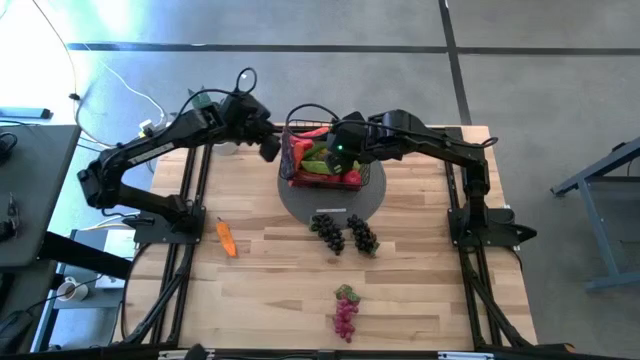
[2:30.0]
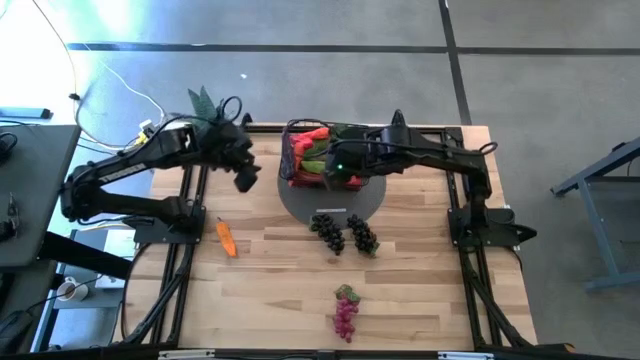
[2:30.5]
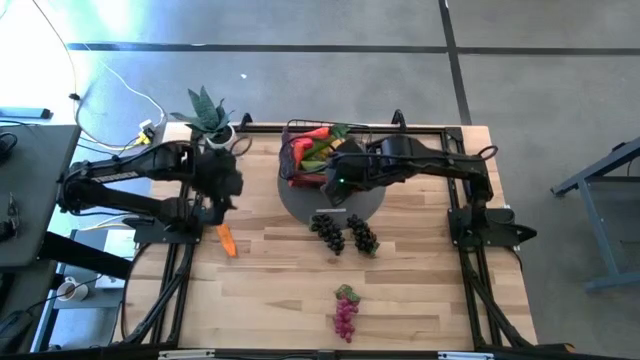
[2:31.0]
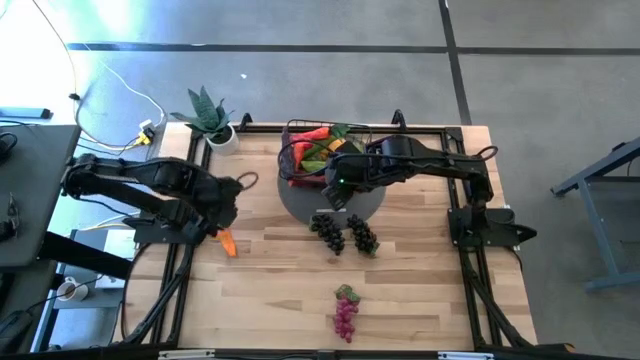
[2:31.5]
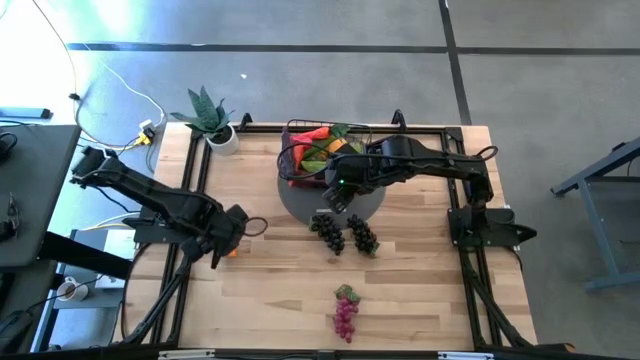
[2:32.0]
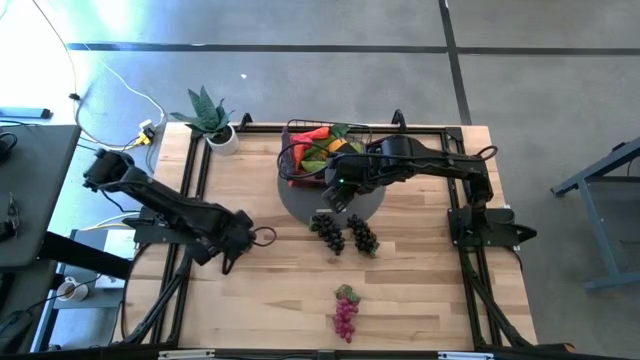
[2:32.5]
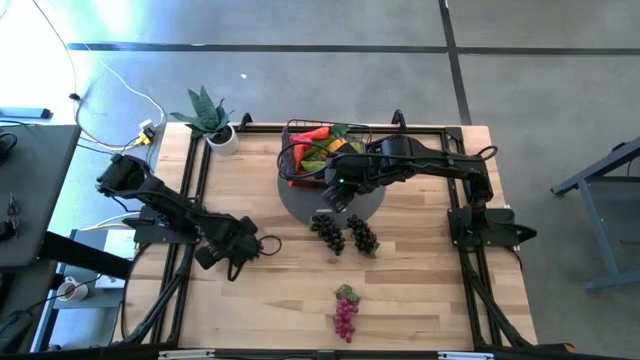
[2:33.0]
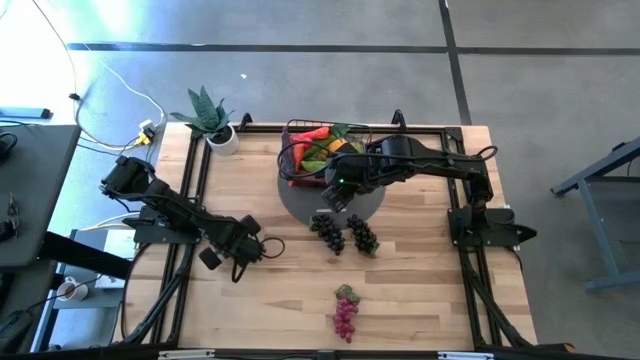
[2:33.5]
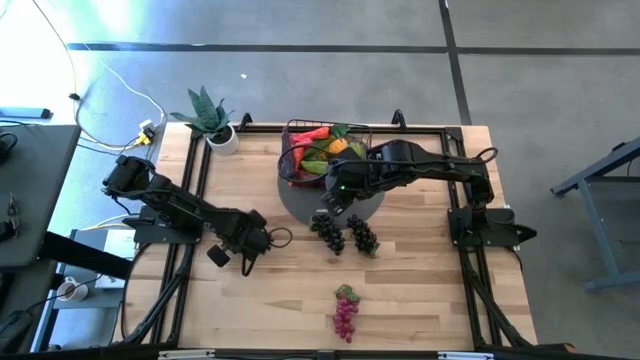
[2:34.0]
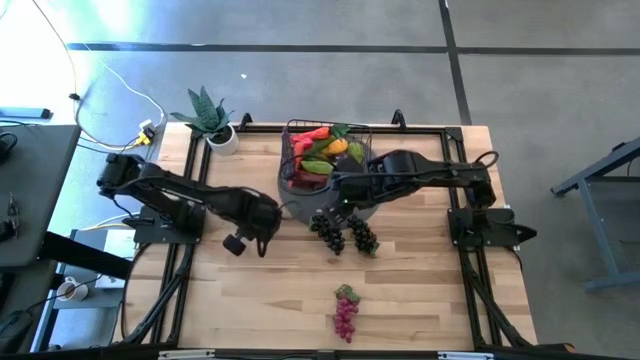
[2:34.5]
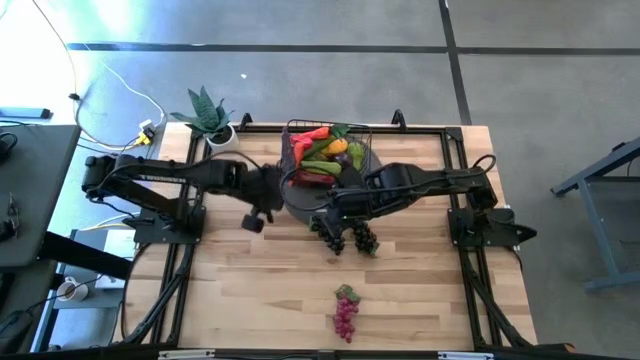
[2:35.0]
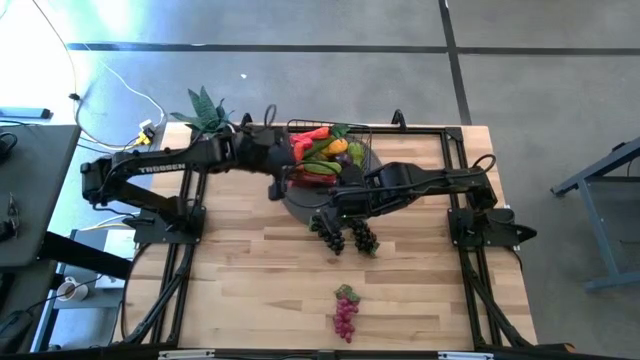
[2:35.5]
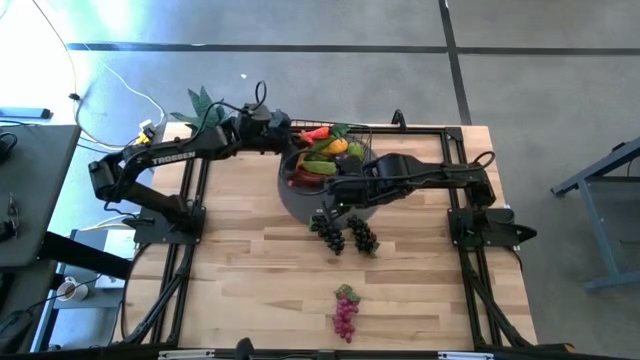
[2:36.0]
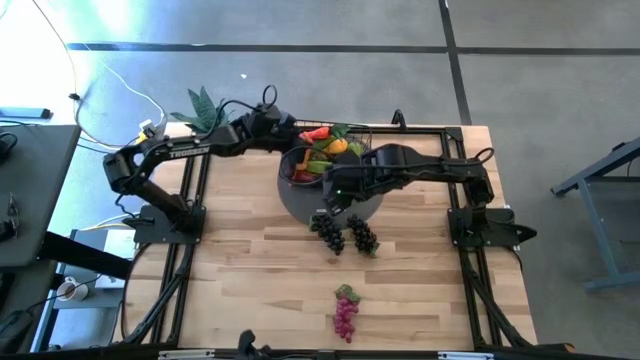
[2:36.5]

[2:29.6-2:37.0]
Task: Build produce basket
Put the orange chilli pepper into the wire basket

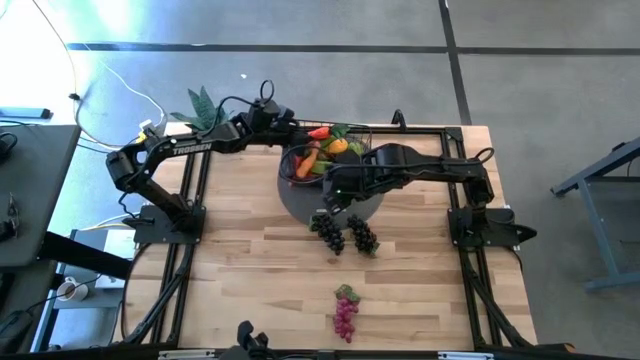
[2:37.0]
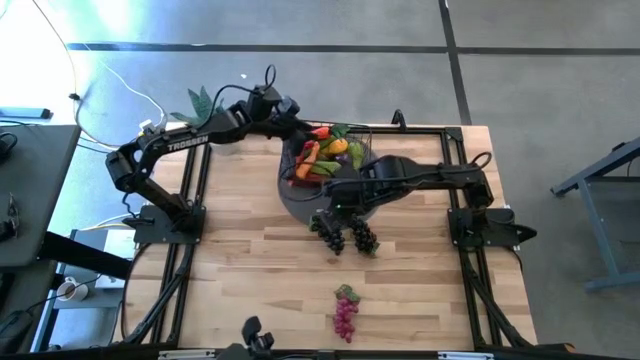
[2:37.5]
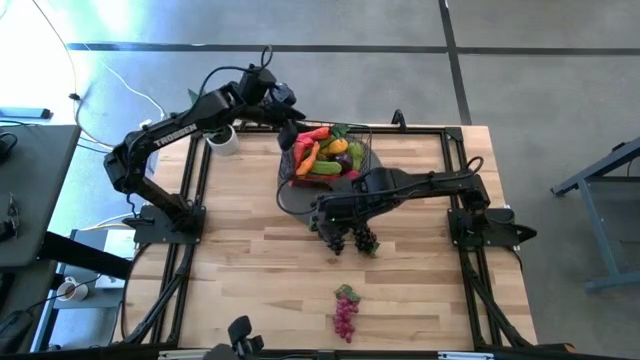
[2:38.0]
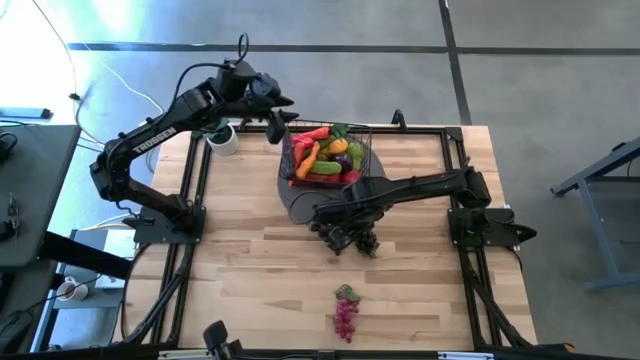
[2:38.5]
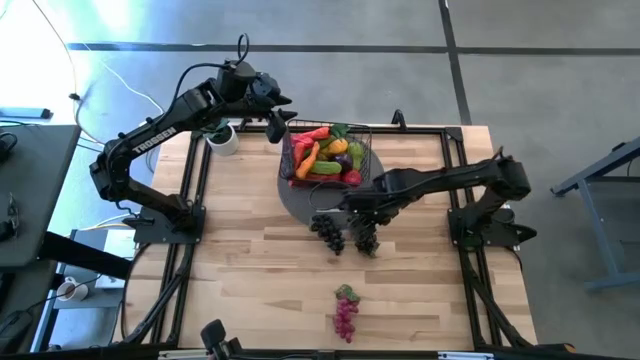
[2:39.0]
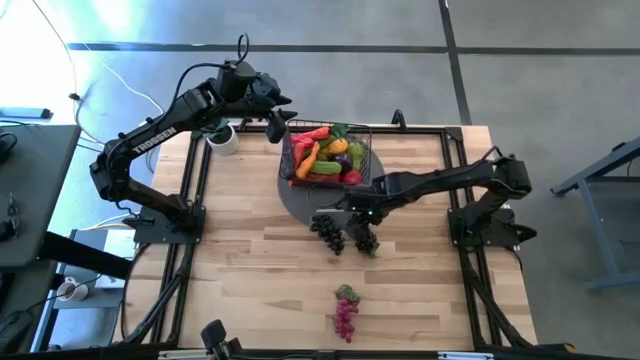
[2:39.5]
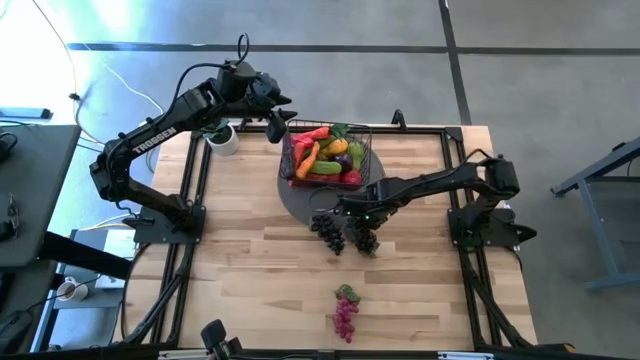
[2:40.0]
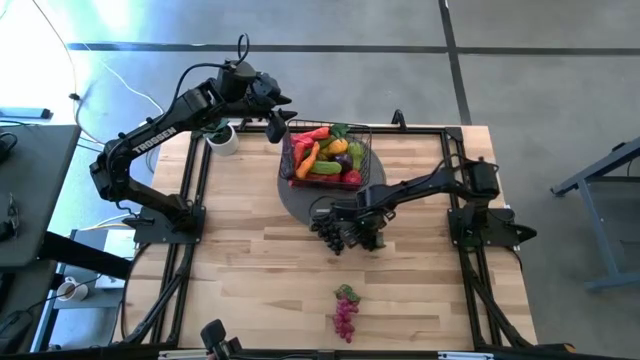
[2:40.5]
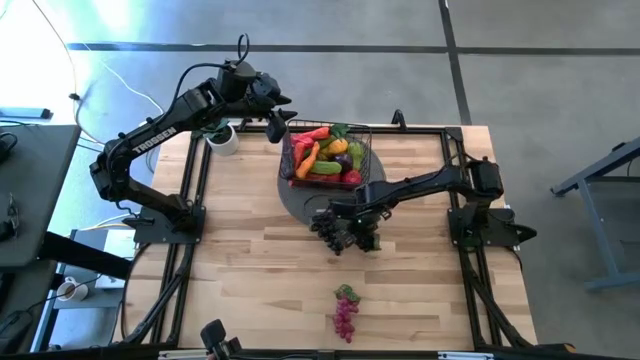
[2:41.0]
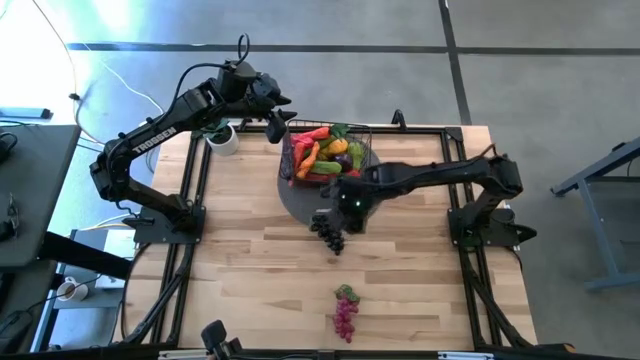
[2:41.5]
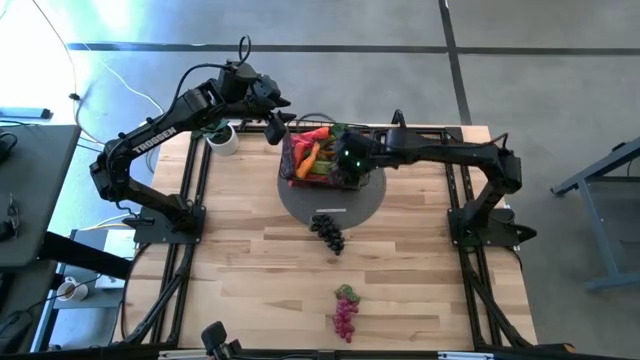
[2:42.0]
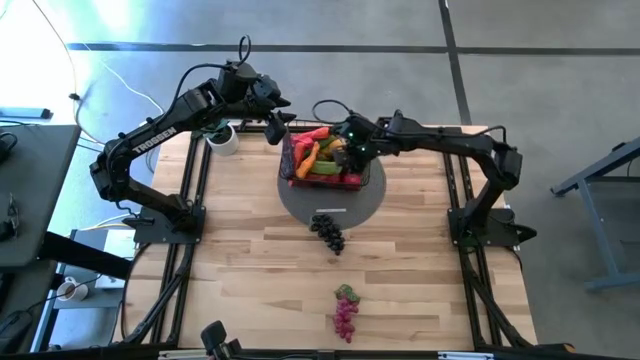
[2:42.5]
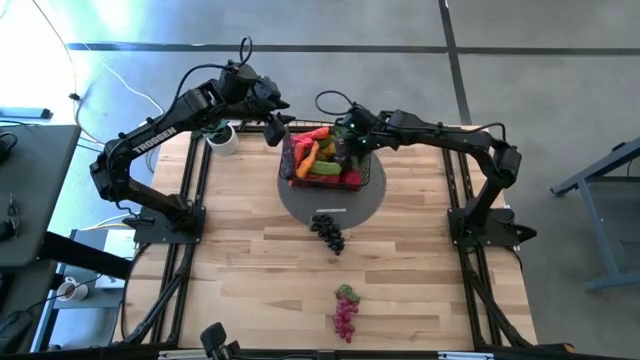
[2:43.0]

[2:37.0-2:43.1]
Put the purple grapes into the wire basket

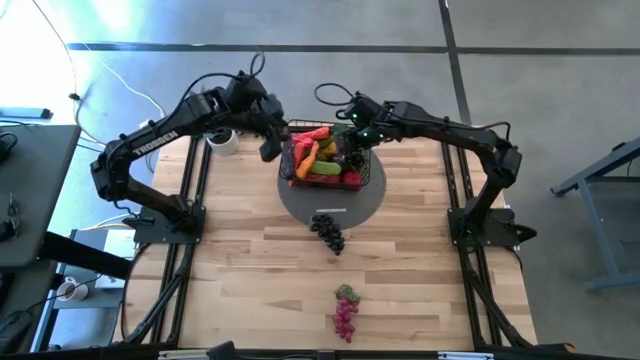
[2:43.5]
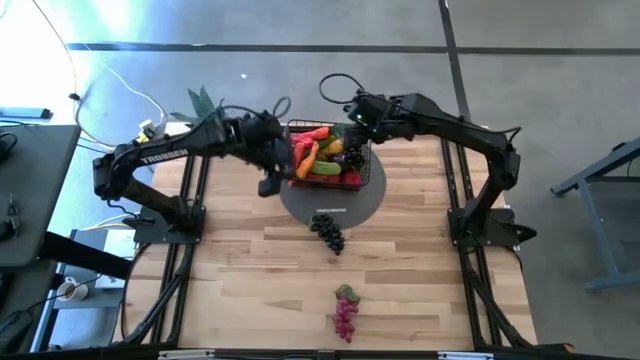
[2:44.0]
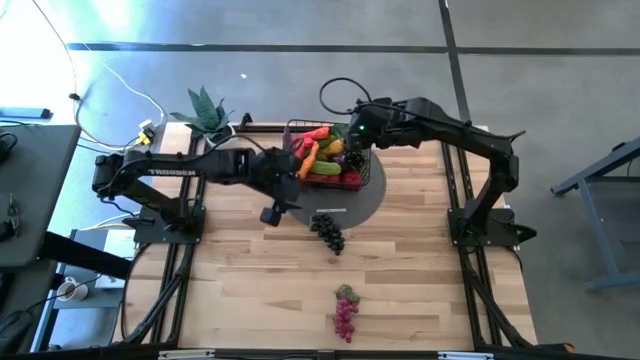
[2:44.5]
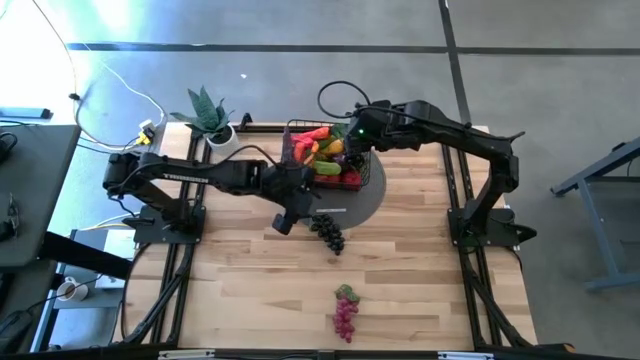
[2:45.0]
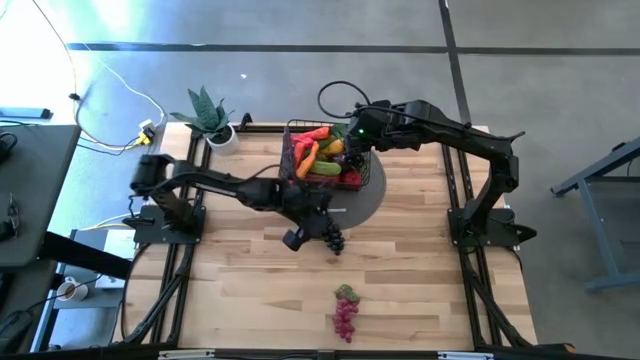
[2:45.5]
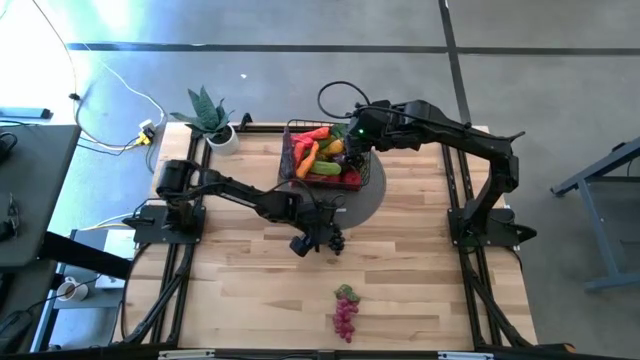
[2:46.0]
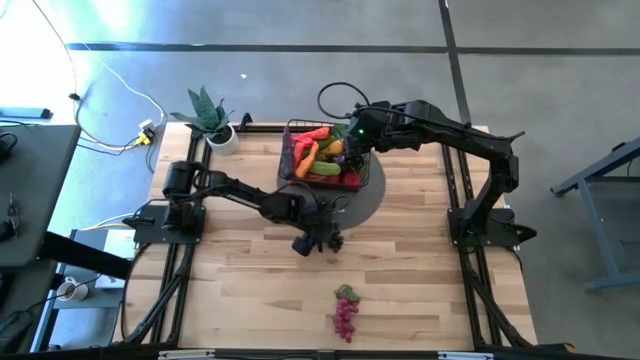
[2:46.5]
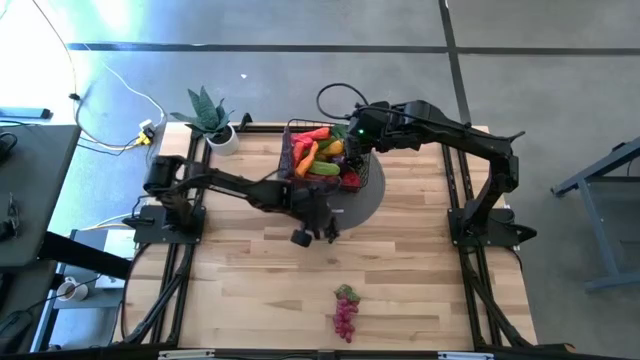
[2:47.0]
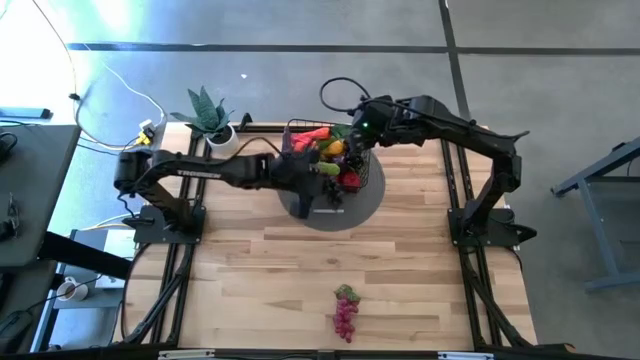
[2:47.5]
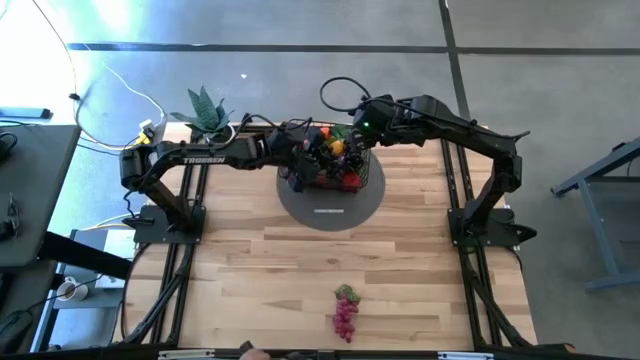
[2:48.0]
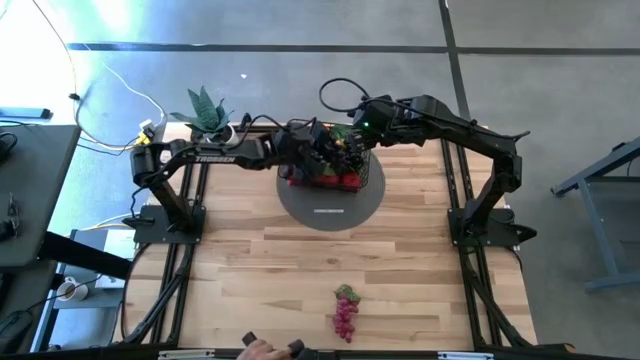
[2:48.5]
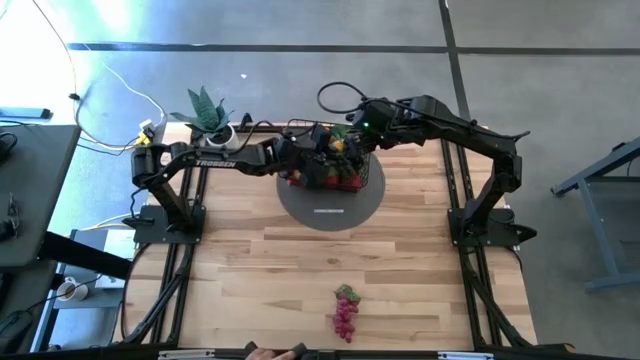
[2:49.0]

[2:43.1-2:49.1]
Put the purple grapes into the wire basket
